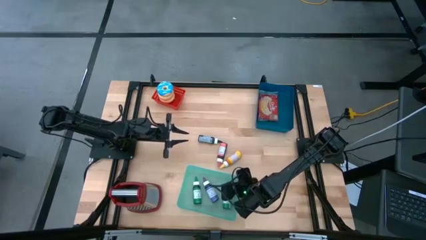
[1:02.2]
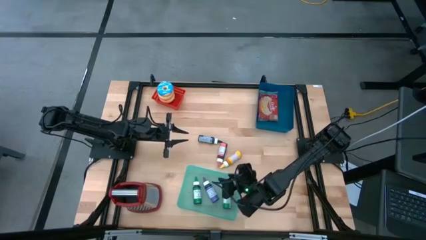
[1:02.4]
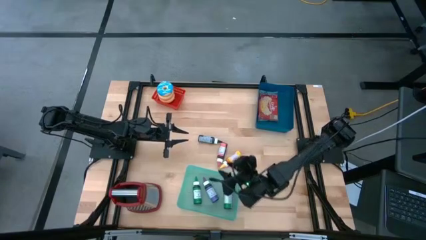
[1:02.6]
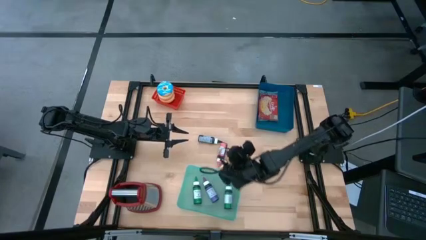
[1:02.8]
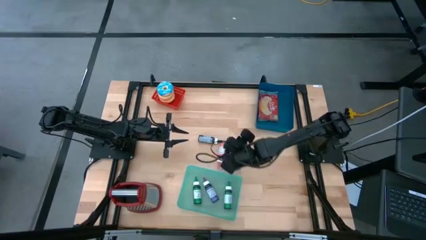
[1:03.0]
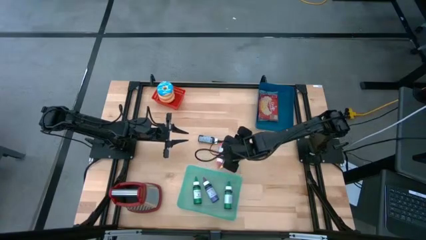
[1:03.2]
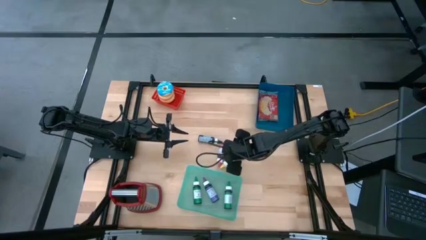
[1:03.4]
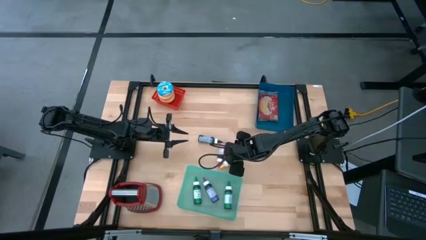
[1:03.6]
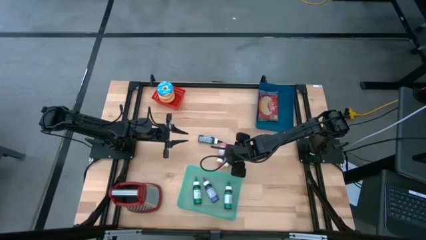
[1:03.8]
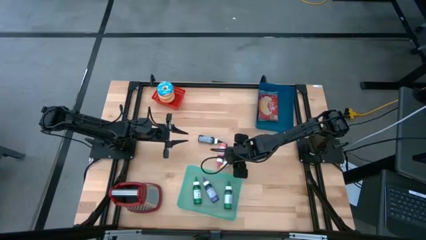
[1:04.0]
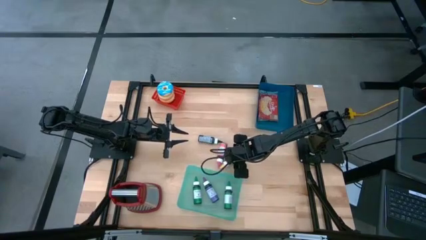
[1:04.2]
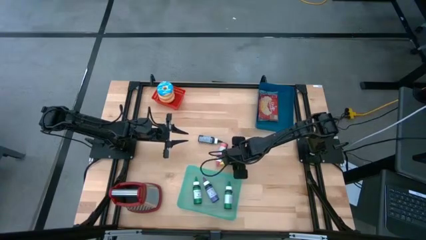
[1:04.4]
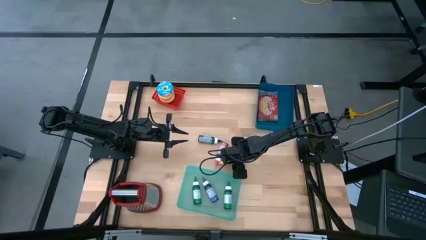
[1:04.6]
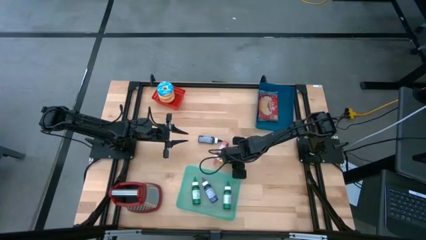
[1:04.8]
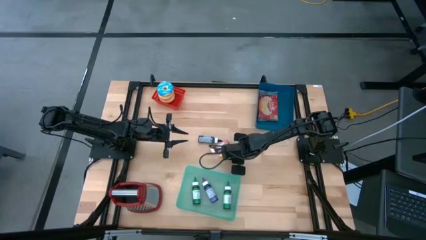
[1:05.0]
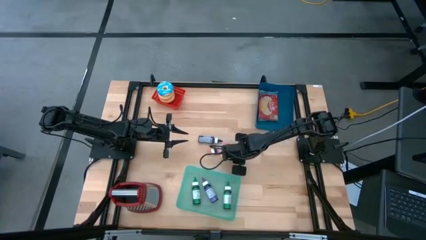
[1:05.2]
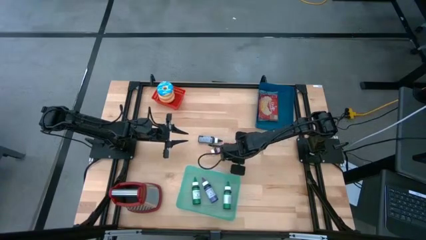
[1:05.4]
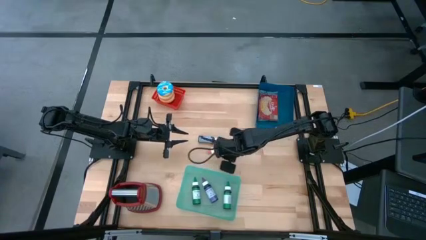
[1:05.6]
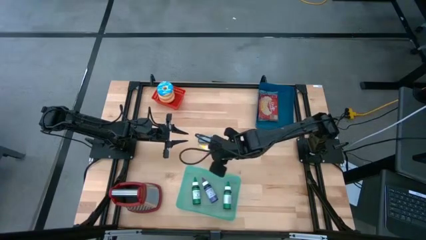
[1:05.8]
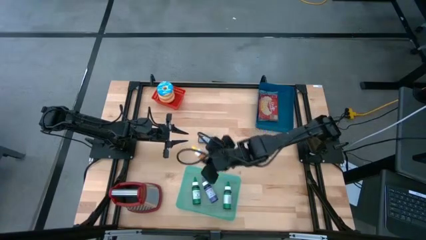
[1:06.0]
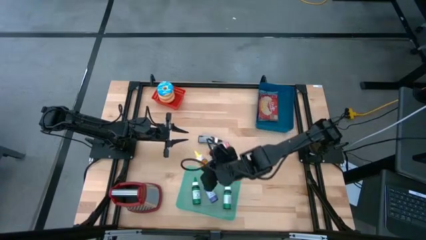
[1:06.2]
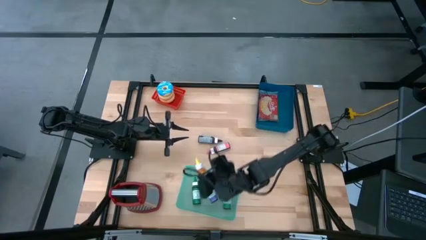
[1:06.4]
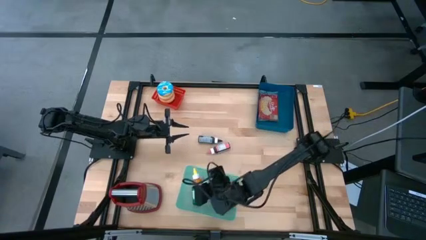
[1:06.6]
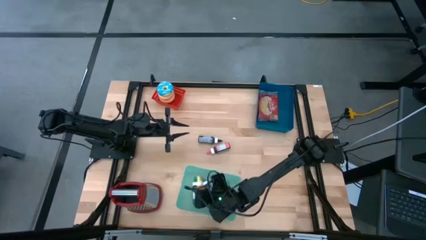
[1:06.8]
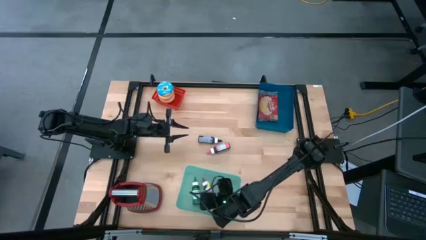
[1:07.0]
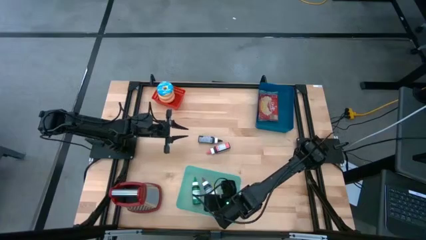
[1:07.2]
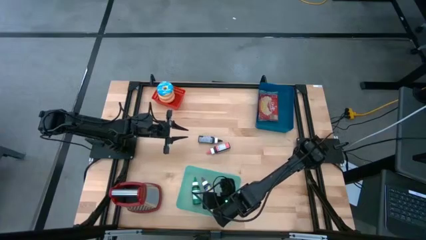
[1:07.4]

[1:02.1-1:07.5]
Put the yellow food coloring bottle into the green bin

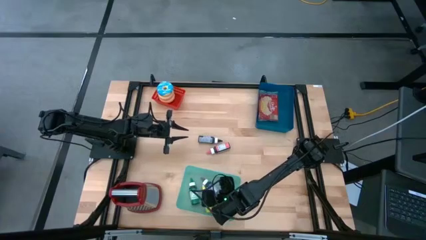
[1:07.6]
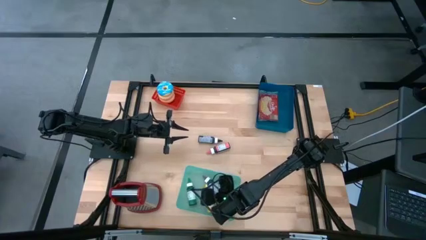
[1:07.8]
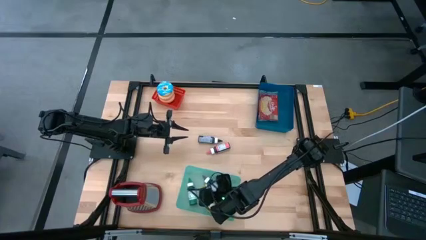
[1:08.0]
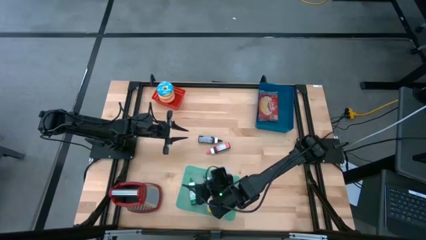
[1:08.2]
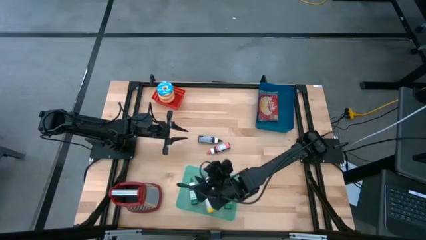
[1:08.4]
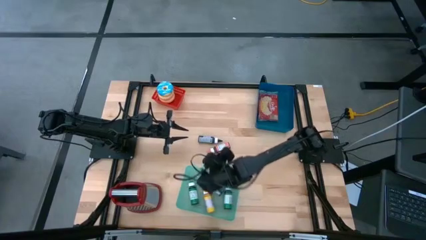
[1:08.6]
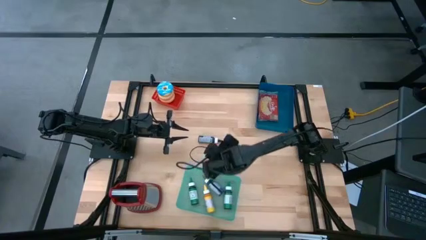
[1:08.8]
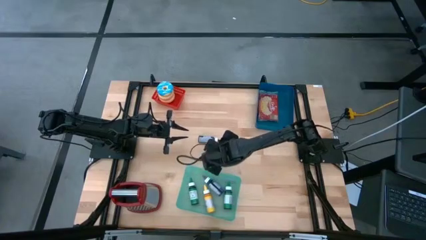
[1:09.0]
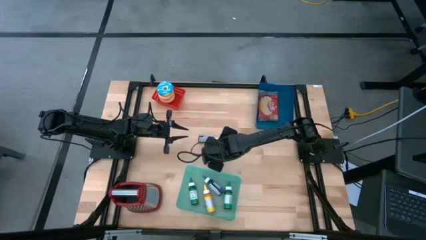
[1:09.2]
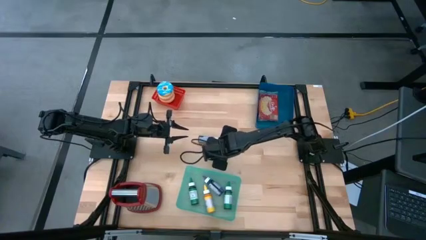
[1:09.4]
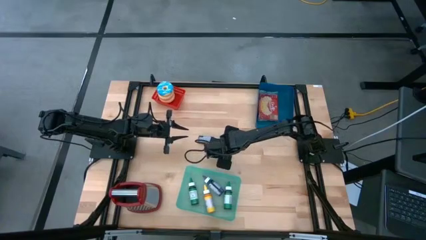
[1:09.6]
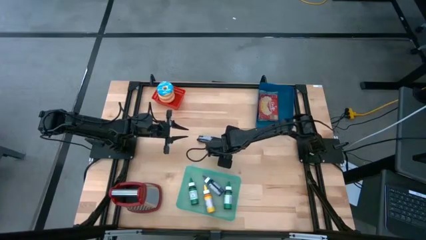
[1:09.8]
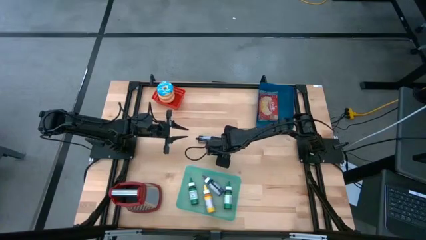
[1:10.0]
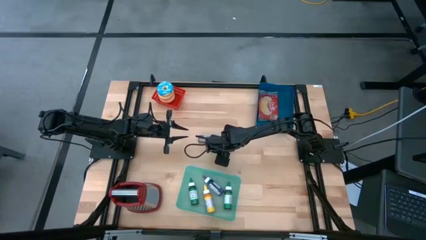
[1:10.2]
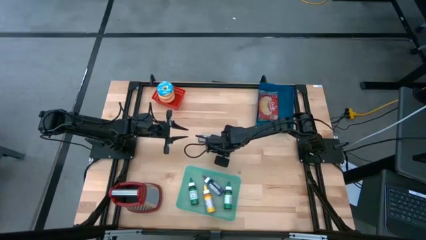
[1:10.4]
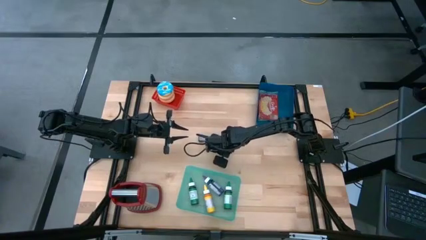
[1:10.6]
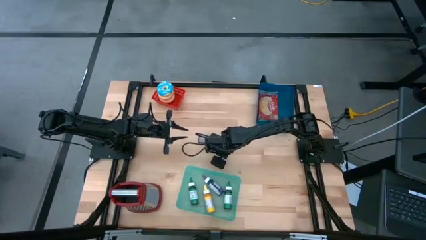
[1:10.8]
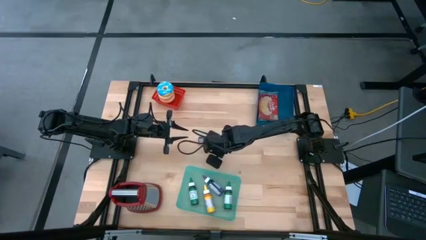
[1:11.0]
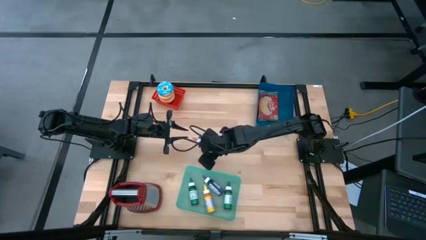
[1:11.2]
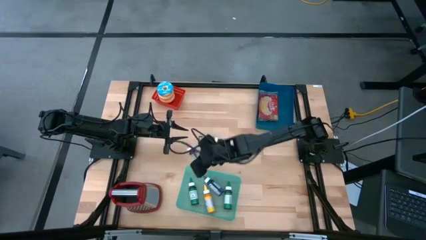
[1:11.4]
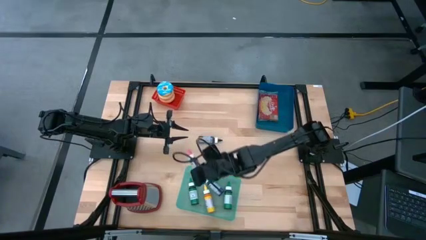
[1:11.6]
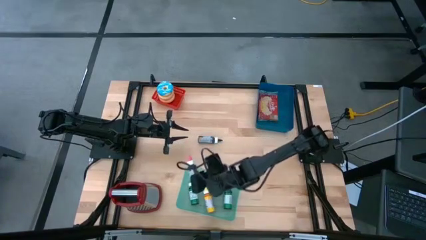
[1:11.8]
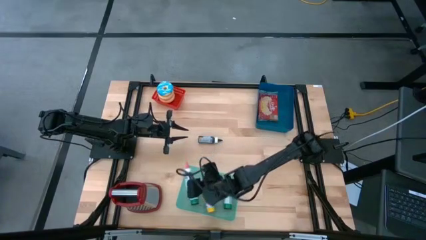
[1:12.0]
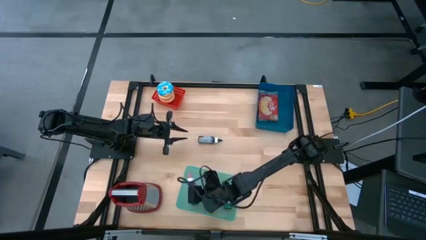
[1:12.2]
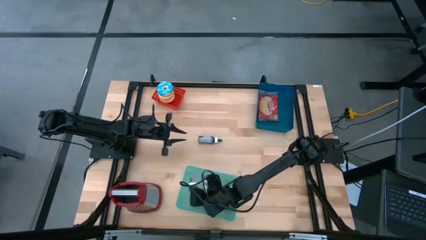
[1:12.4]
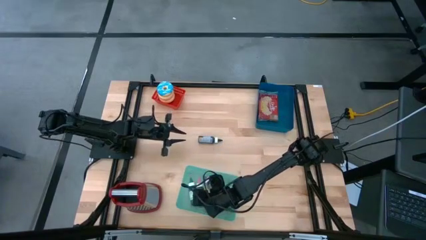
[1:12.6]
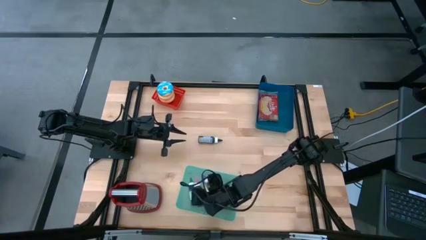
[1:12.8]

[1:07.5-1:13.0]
Put the pink food coloring bottle into the green bin

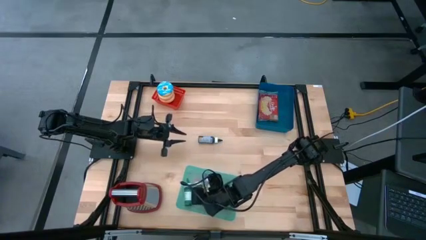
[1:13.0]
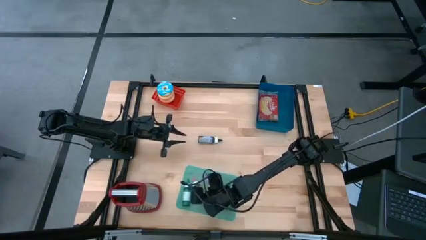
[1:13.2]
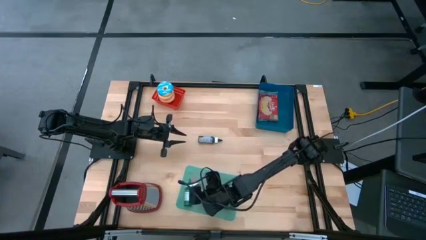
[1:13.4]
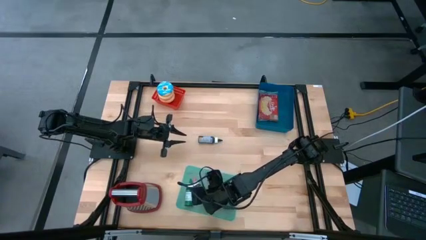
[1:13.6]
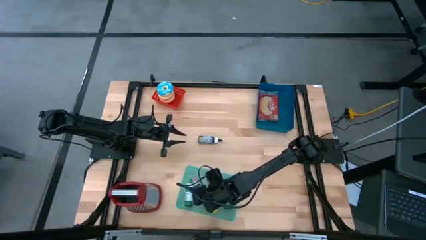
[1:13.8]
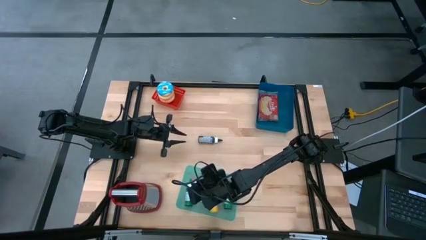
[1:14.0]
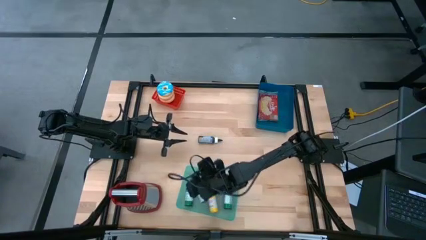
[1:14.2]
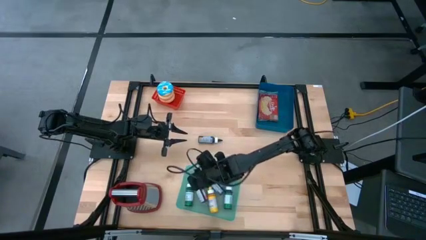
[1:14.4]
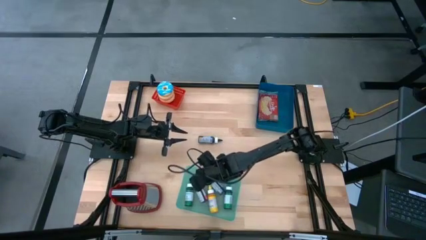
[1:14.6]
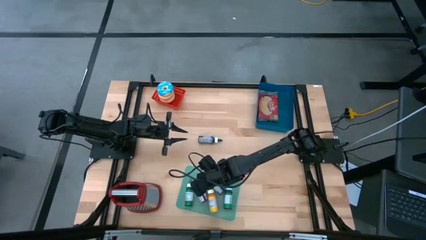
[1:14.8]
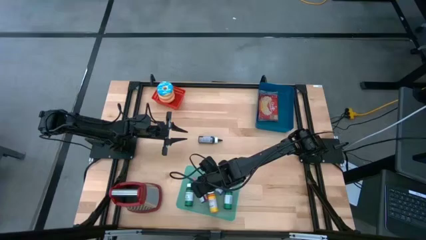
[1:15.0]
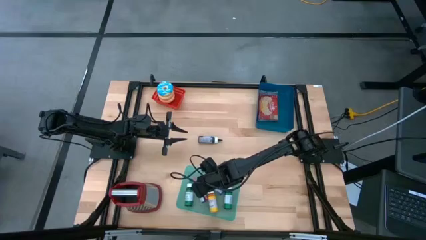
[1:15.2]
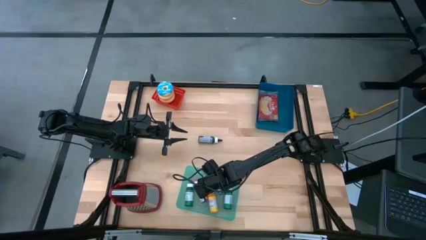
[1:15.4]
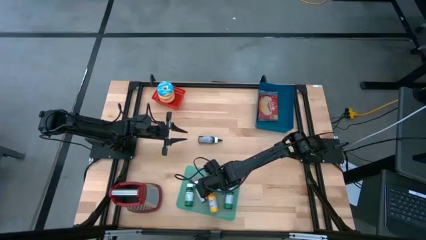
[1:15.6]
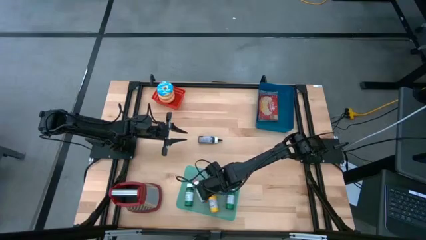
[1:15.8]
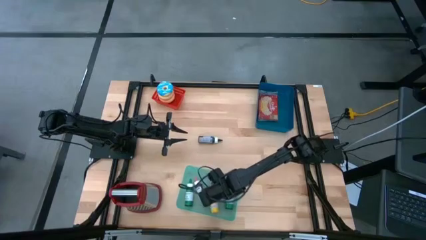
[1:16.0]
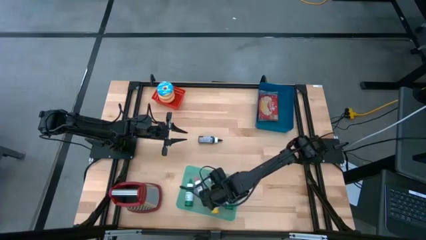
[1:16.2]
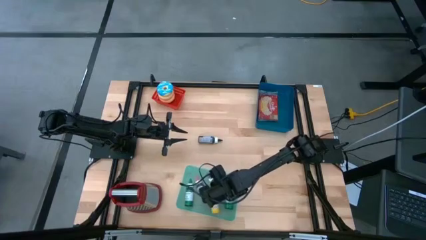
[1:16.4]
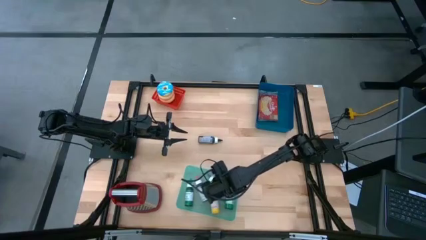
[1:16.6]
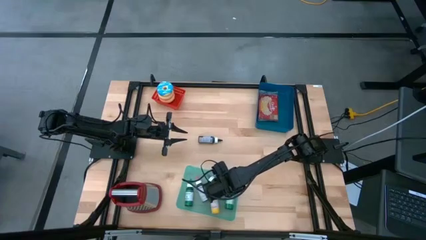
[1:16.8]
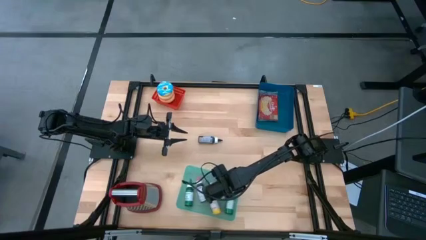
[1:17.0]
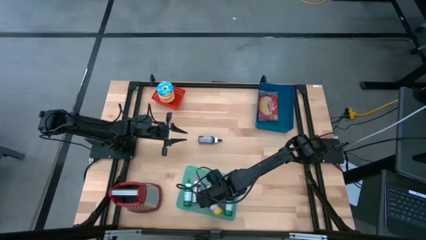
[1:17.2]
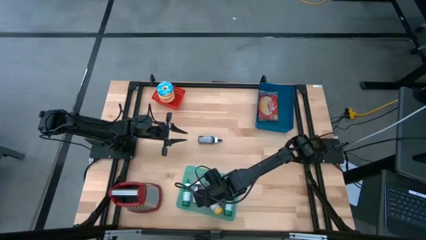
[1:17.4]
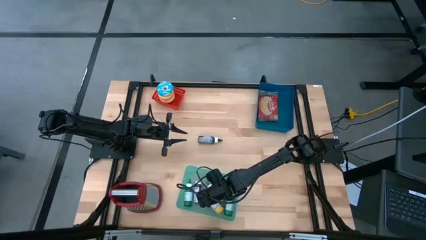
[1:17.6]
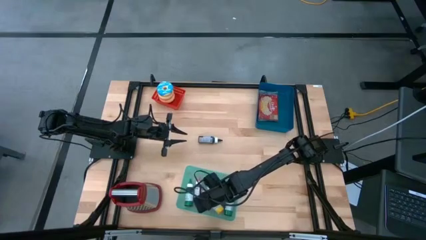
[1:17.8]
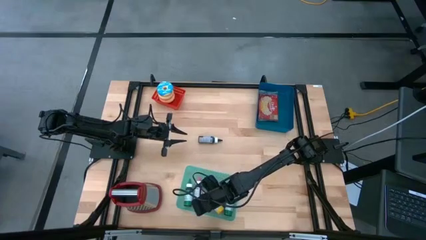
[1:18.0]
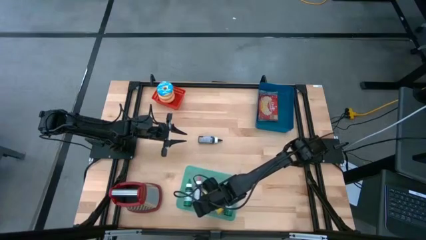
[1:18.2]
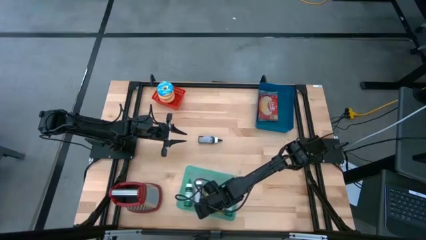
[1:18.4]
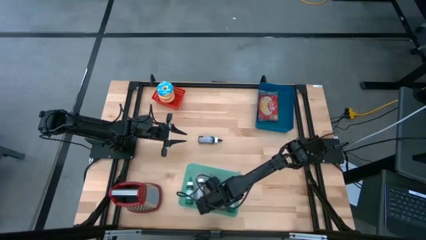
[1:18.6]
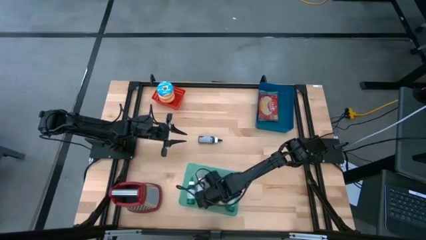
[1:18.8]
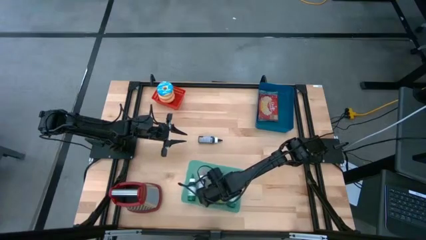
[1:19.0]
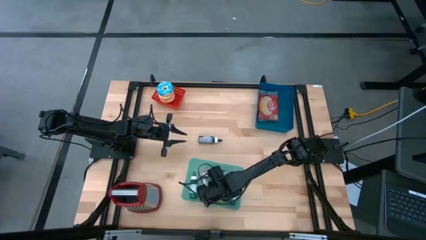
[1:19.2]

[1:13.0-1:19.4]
Adjust the yellow food coloring bottle on the bin
